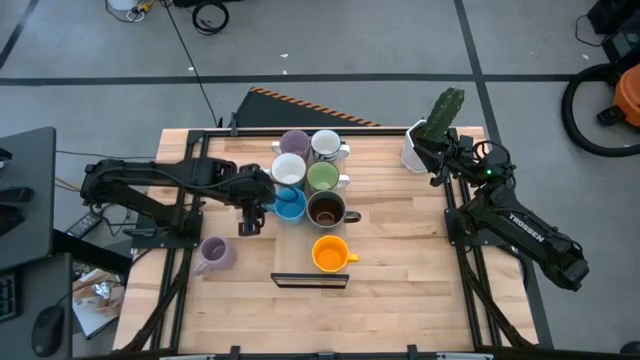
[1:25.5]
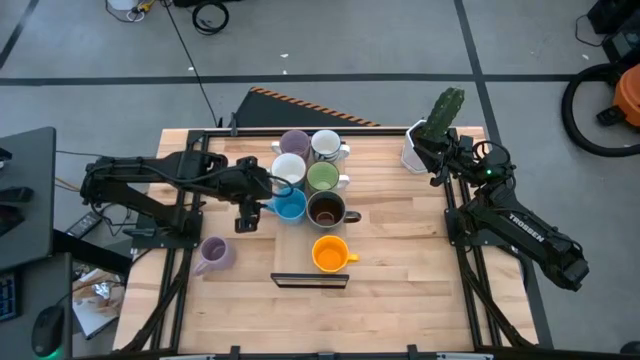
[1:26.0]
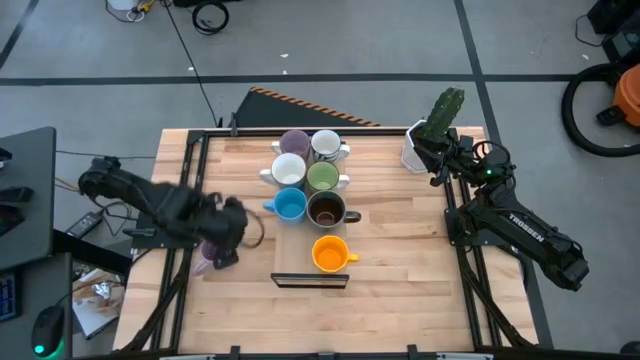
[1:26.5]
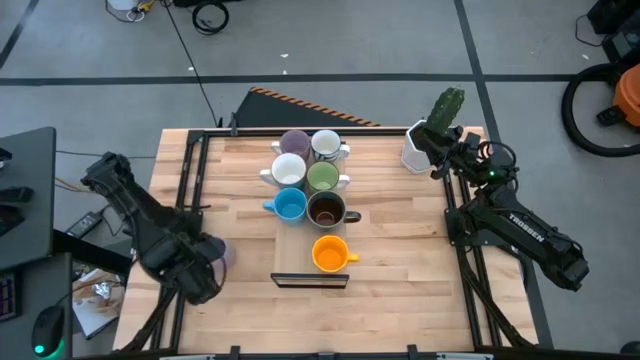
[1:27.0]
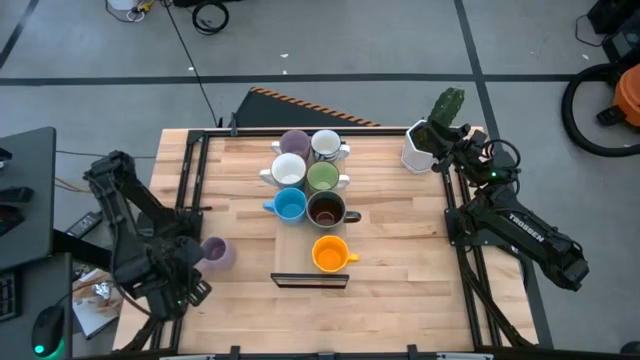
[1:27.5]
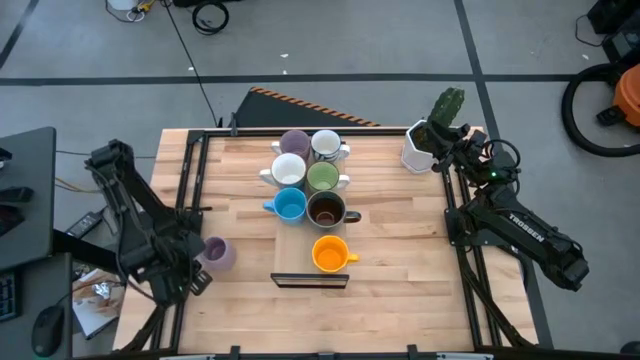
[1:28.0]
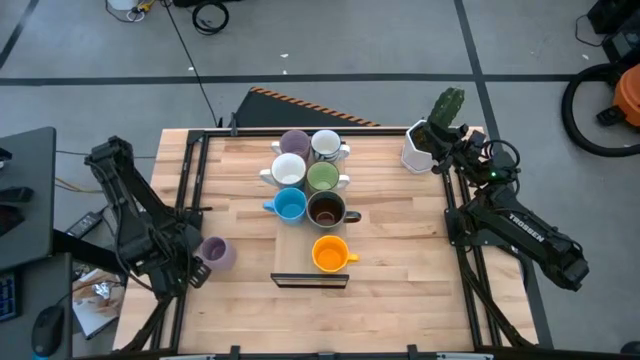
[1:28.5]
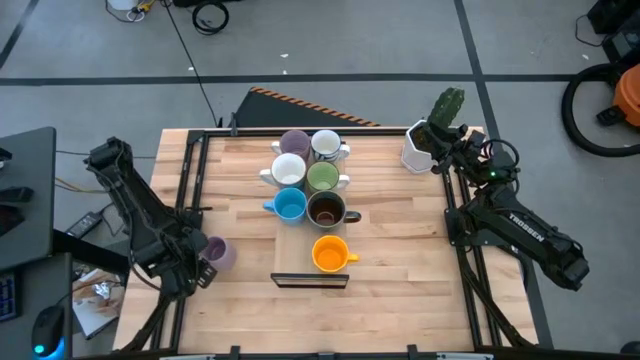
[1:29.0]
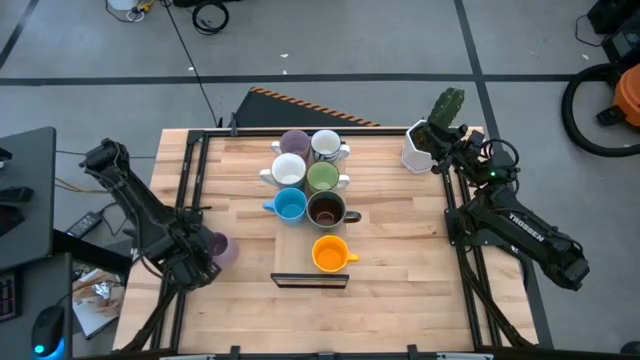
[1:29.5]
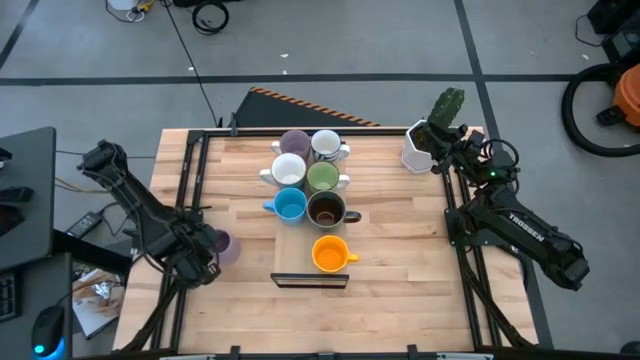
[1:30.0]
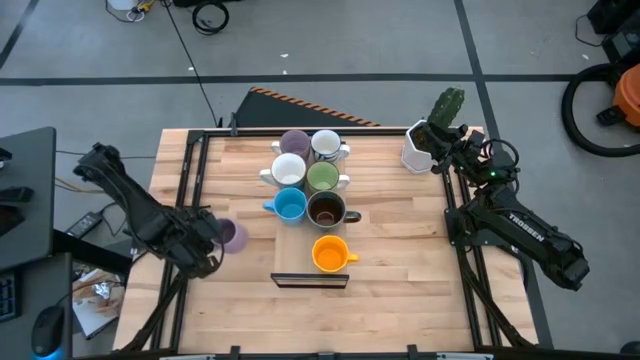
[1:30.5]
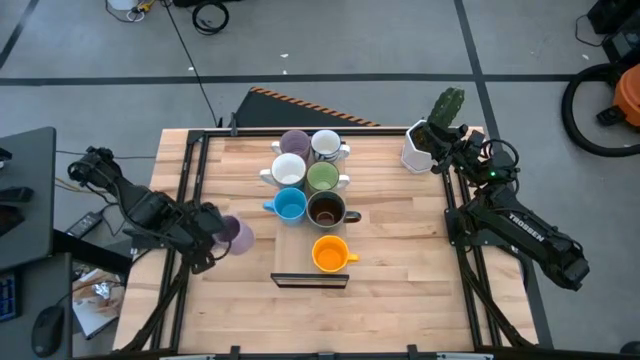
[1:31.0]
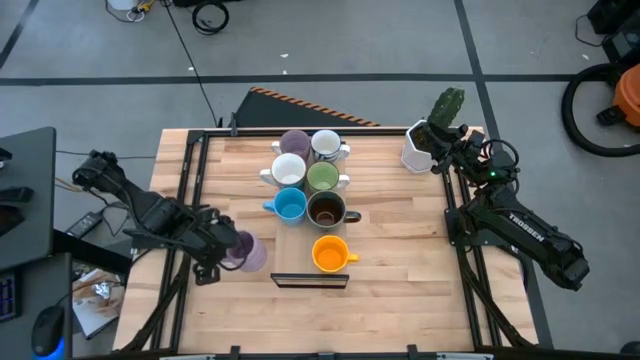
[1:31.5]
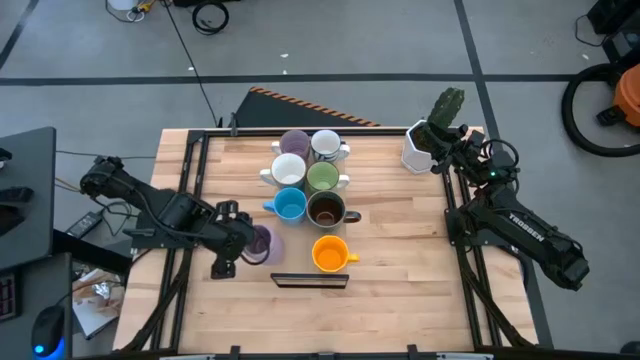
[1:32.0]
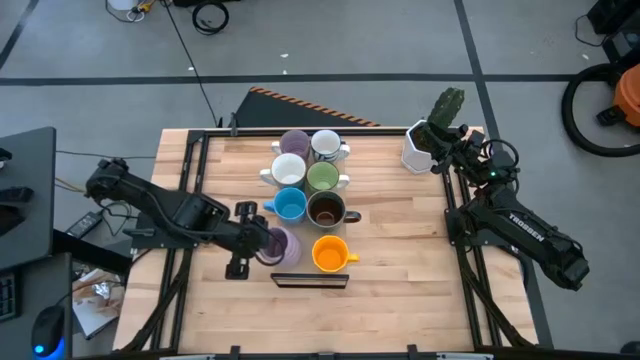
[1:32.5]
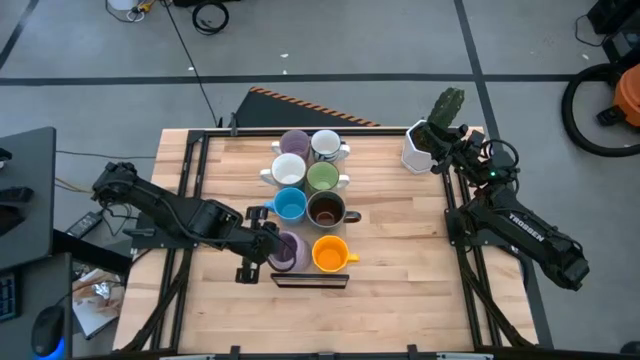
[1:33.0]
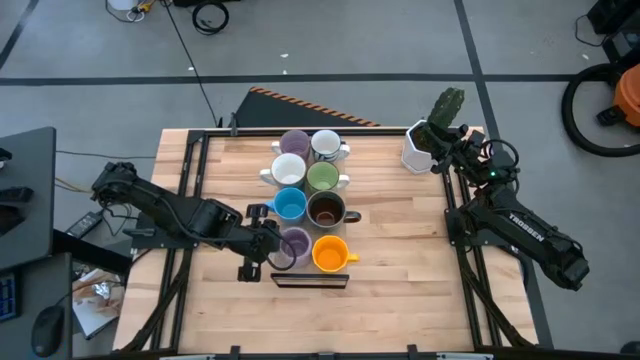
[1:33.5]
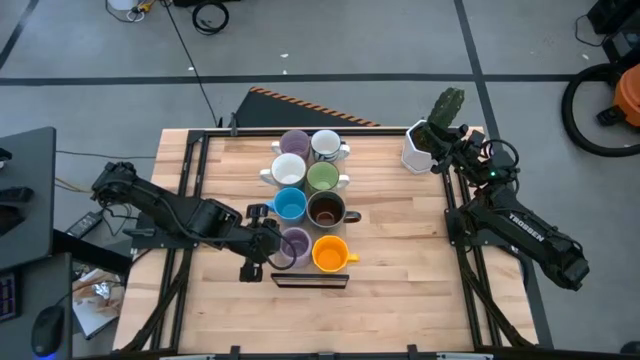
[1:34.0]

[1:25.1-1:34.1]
Task: Place coffee mugs
Put the violet mug on the shelf

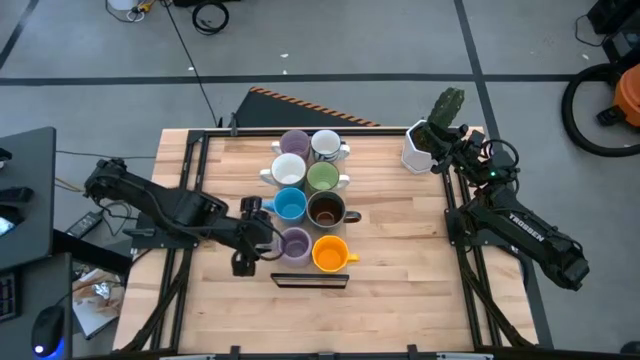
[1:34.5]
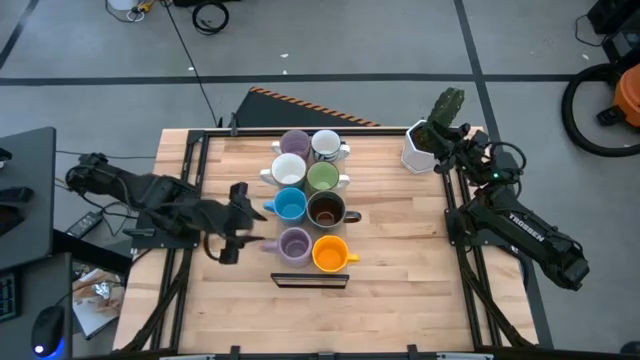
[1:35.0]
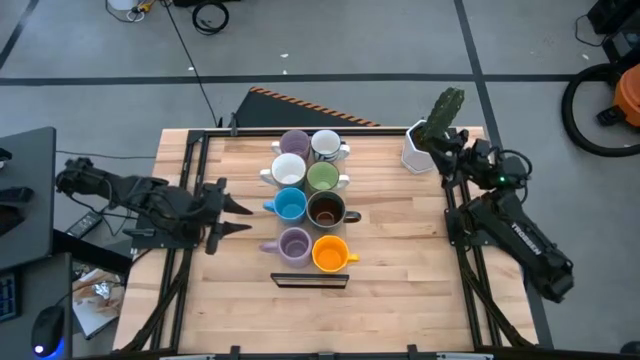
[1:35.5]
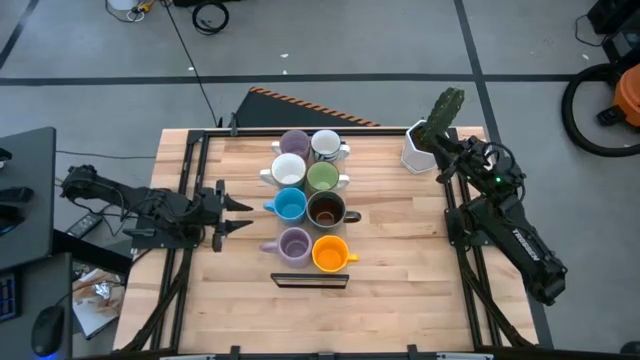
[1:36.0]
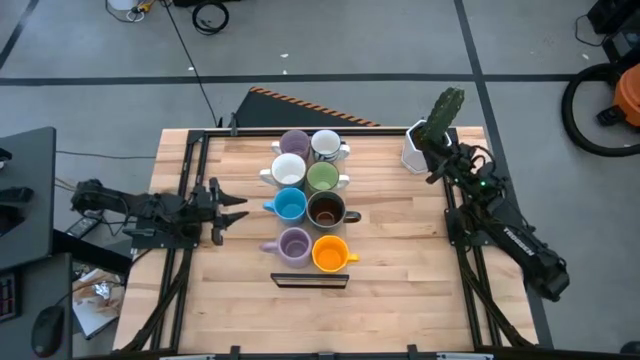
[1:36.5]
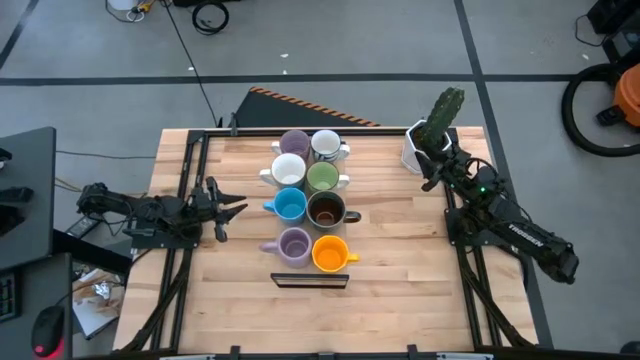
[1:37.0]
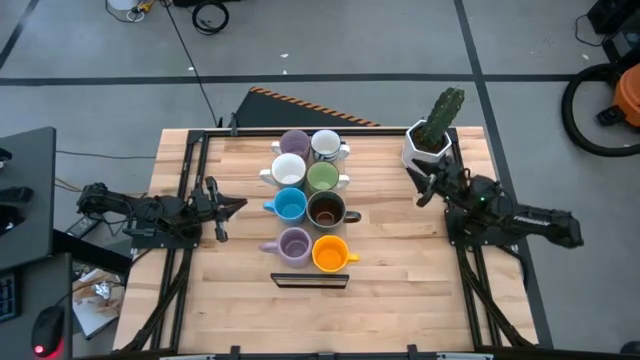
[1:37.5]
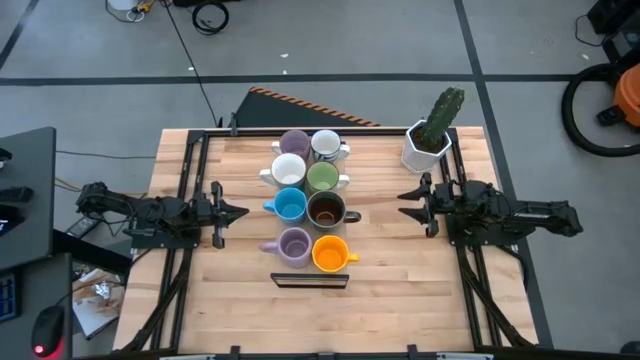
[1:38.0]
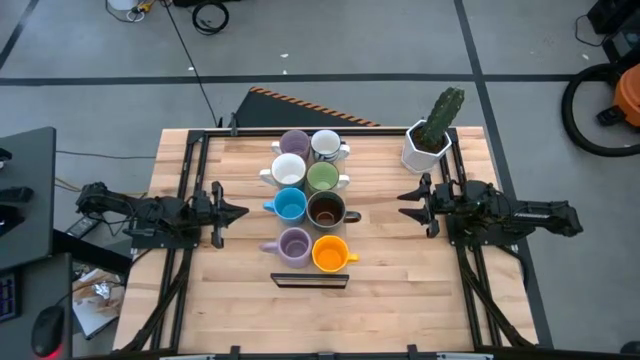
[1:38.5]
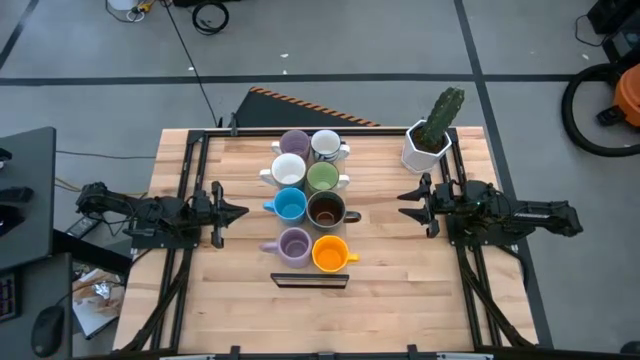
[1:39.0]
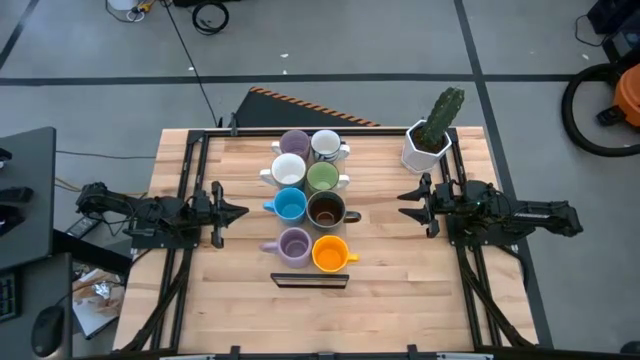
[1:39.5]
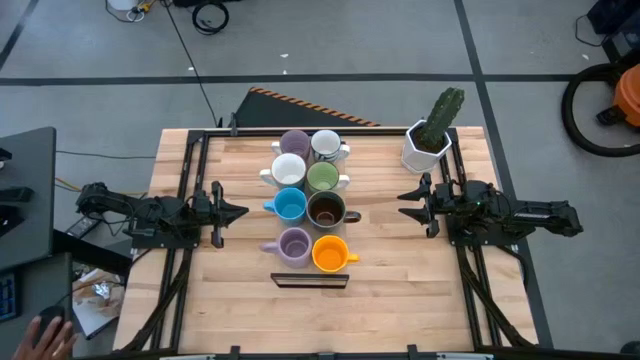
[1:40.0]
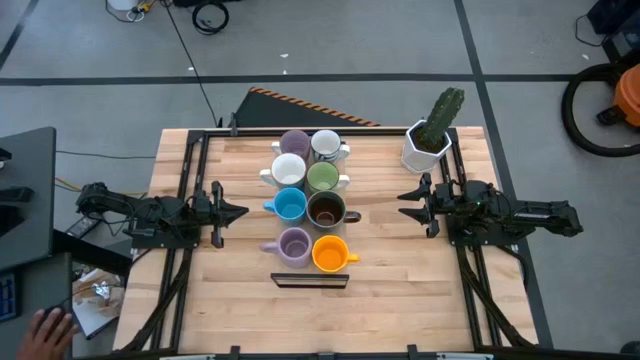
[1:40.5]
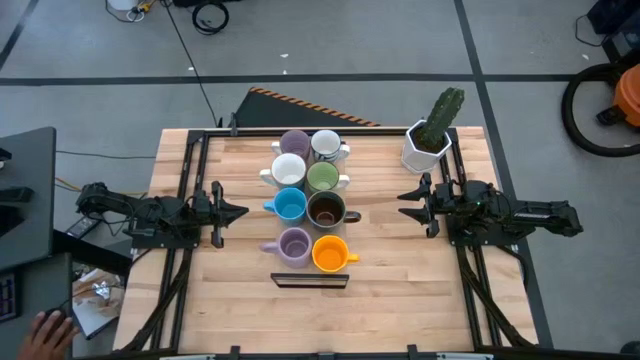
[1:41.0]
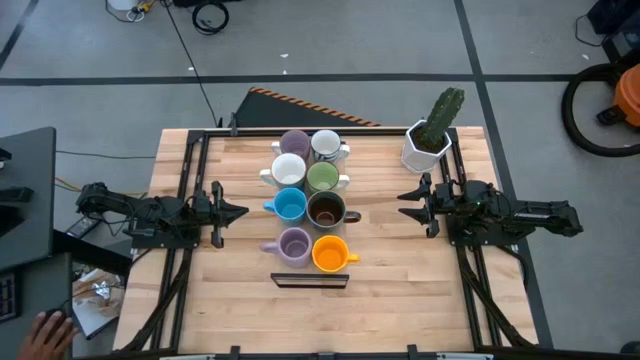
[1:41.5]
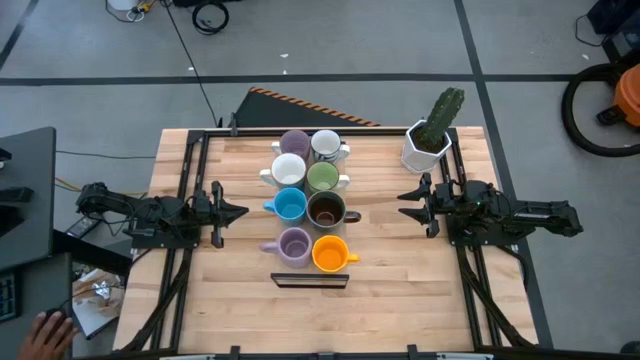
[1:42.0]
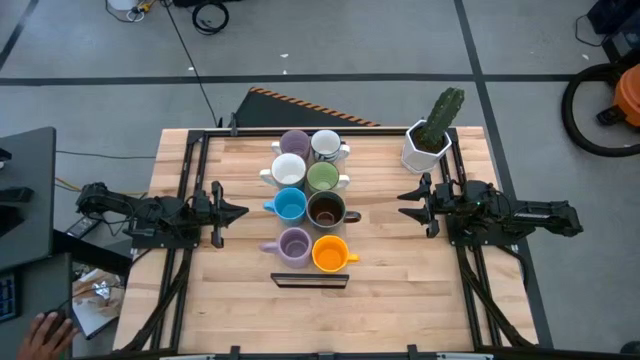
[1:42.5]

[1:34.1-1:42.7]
Return to Home Position

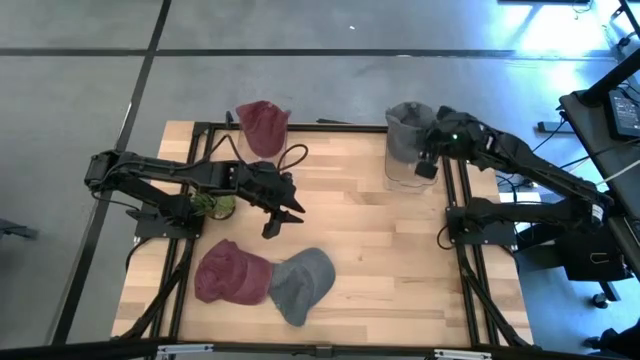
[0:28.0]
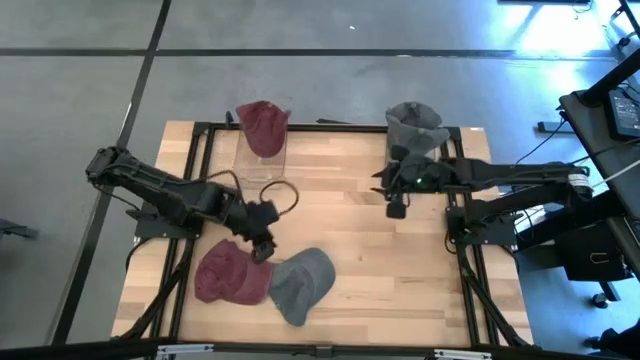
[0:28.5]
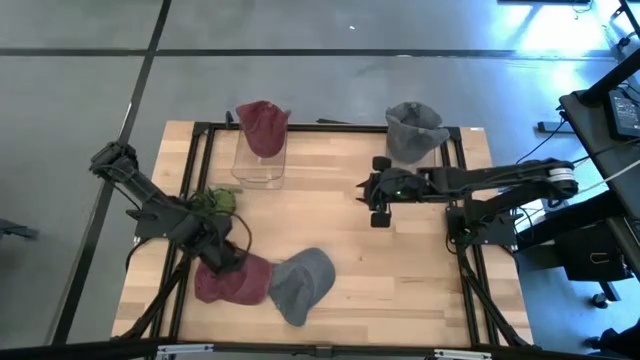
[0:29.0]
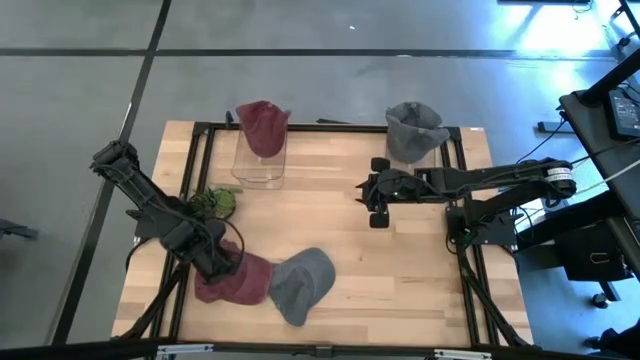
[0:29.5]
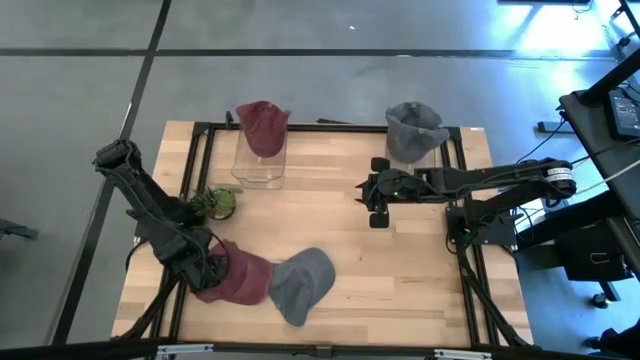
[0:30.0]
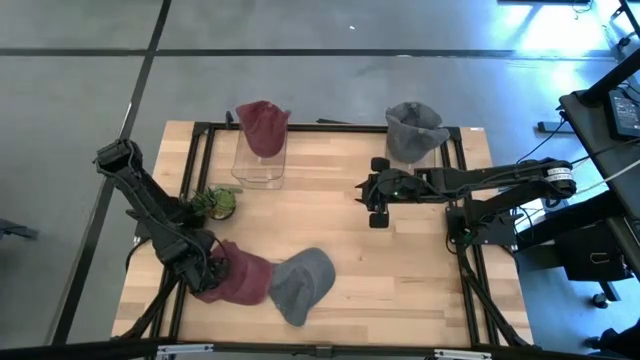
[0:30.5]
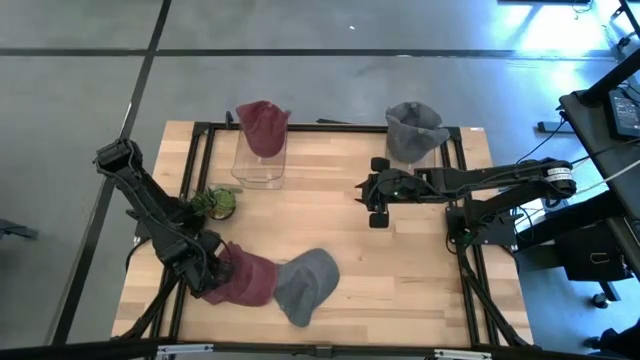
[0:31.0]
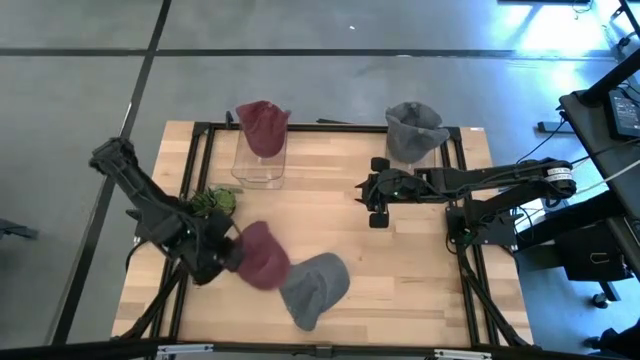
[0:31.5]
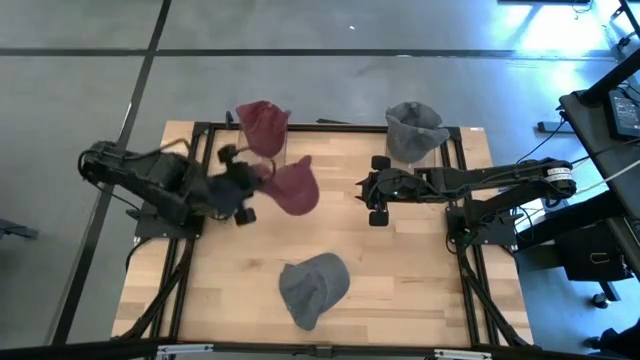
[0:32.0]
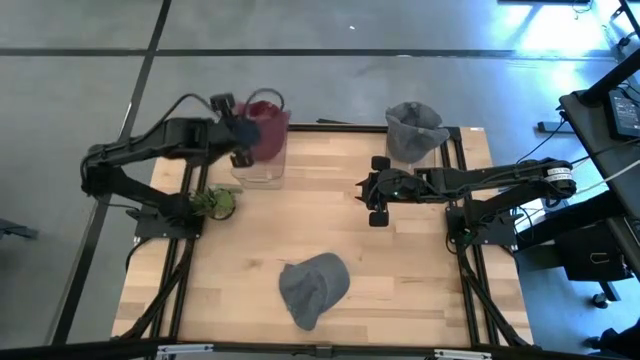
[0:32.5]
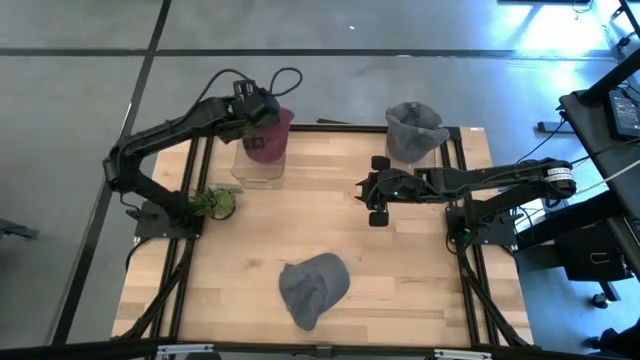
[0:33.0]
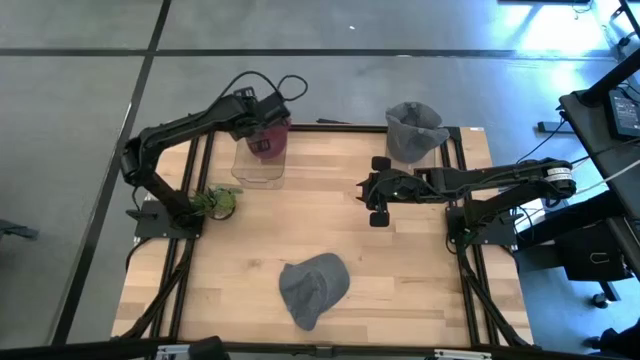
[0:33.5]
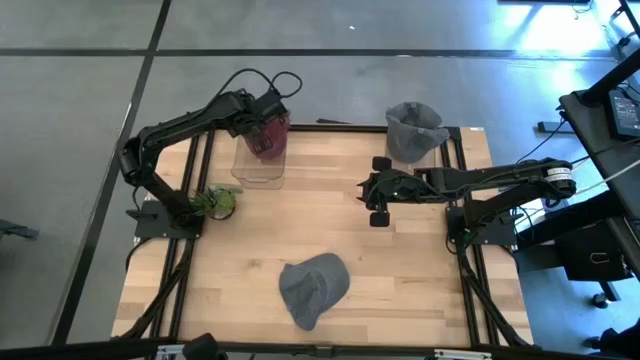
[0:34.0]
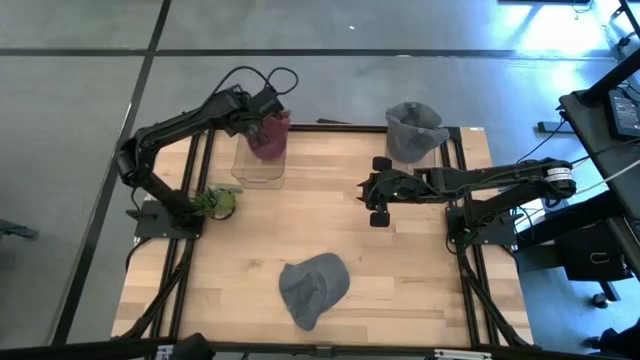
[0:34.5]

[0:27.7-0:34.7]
Task: Pick & Place hat
Put the red cap into the left transparent bin
